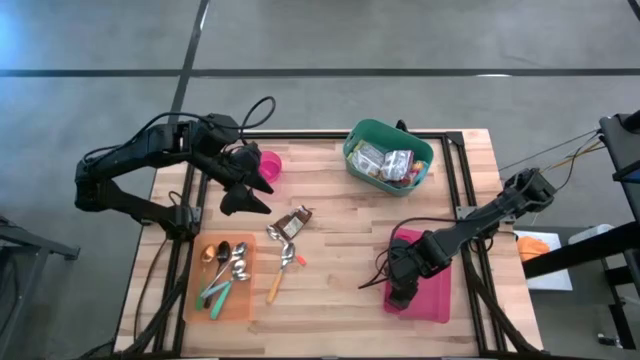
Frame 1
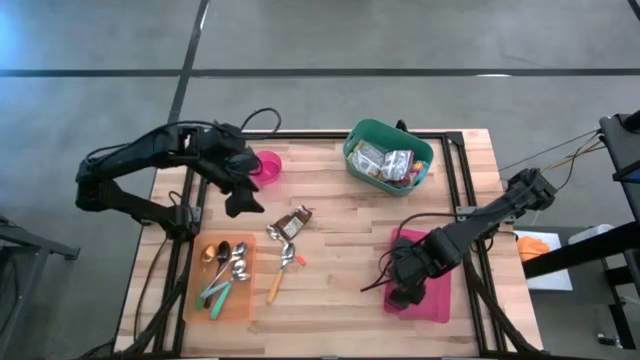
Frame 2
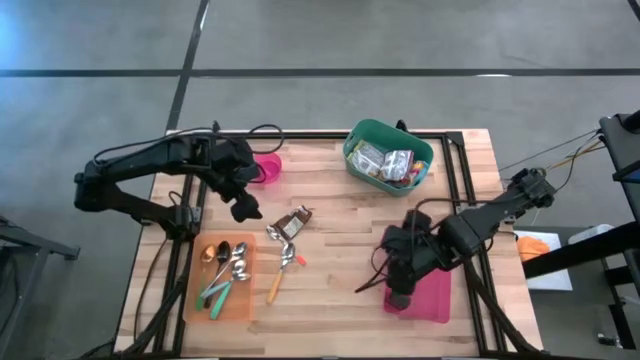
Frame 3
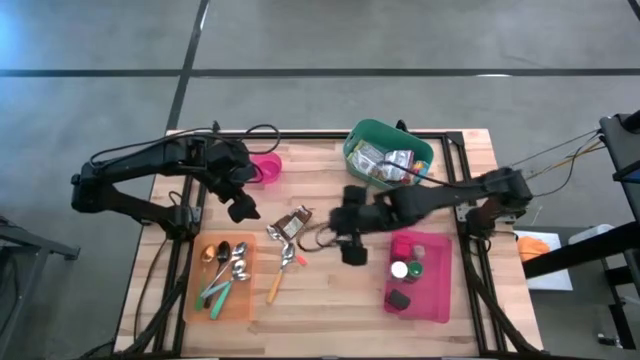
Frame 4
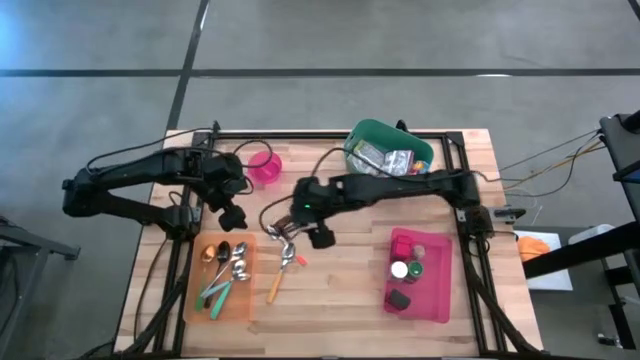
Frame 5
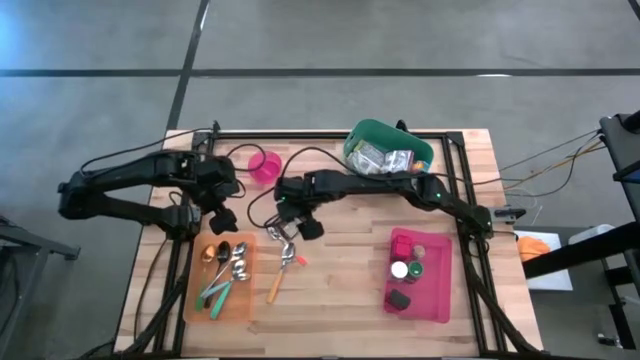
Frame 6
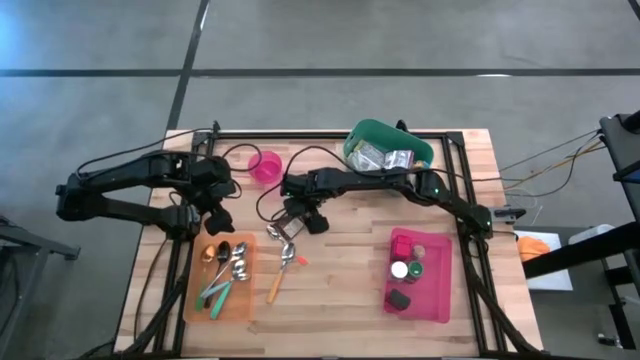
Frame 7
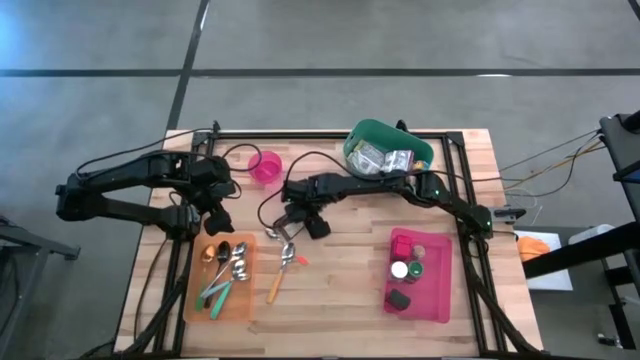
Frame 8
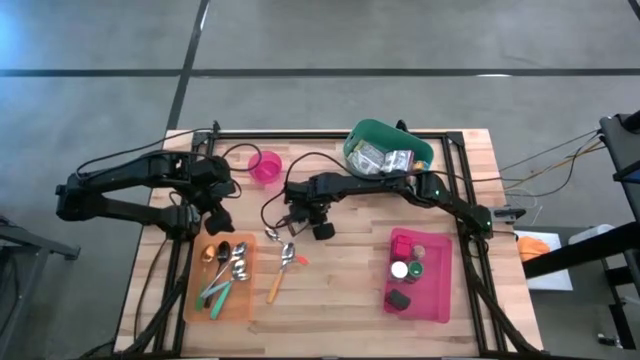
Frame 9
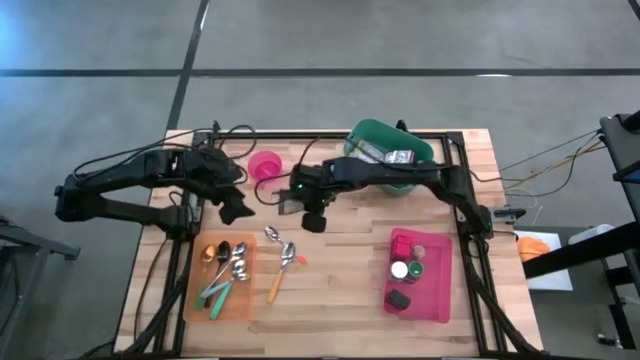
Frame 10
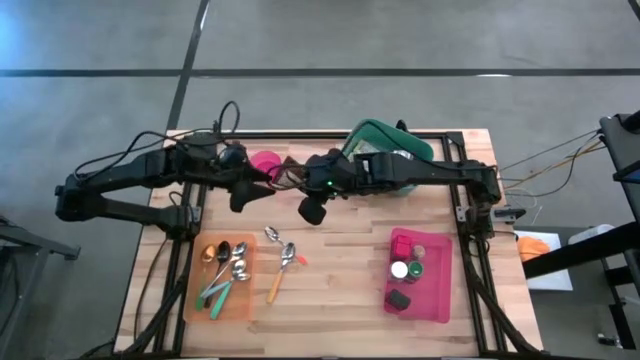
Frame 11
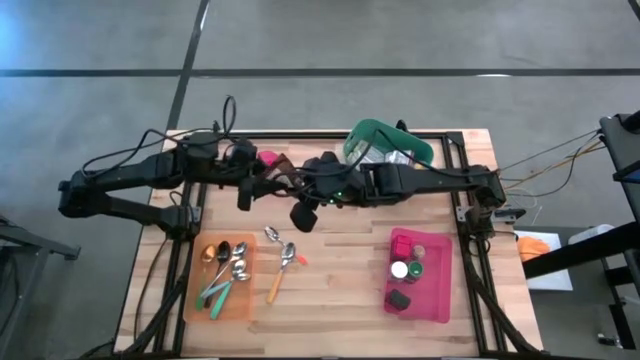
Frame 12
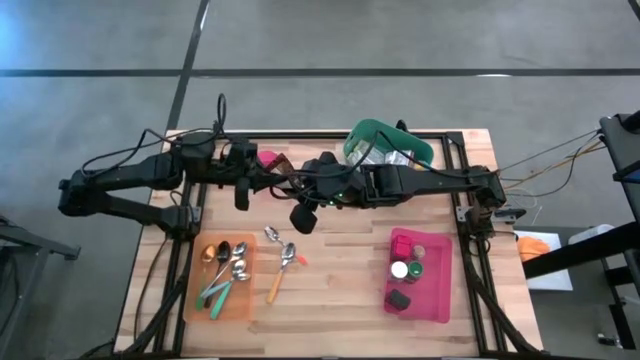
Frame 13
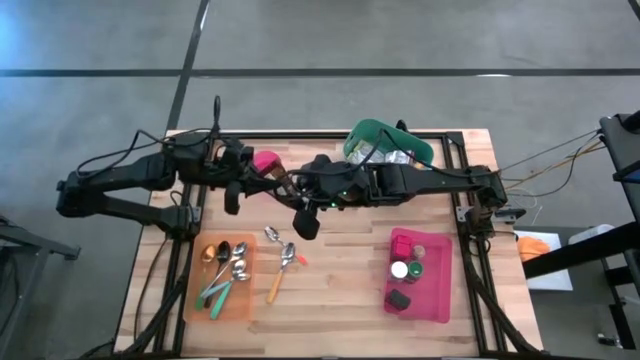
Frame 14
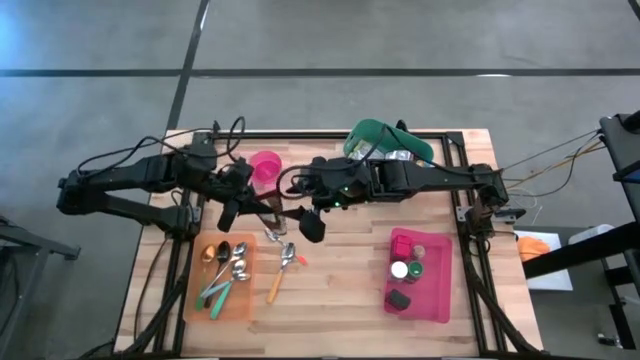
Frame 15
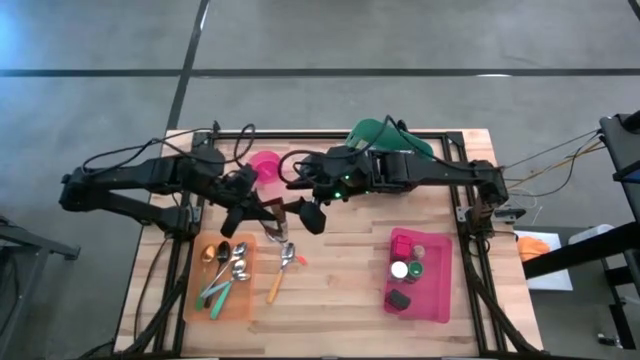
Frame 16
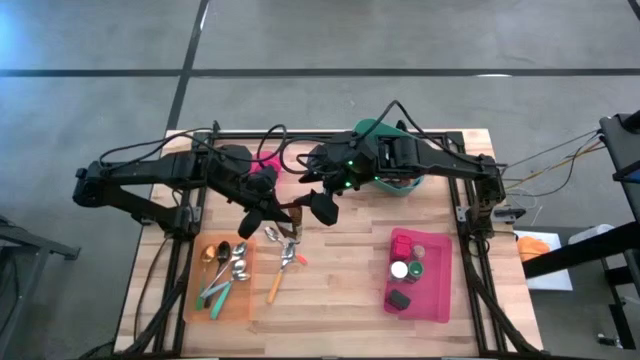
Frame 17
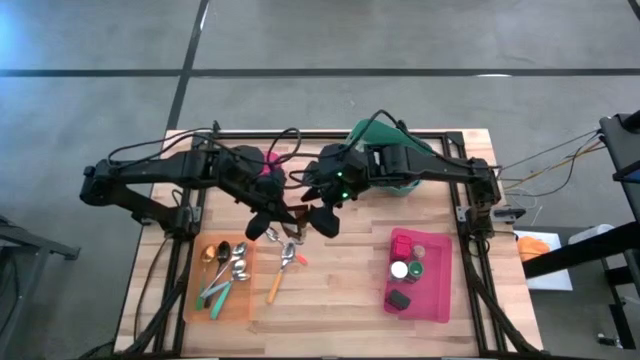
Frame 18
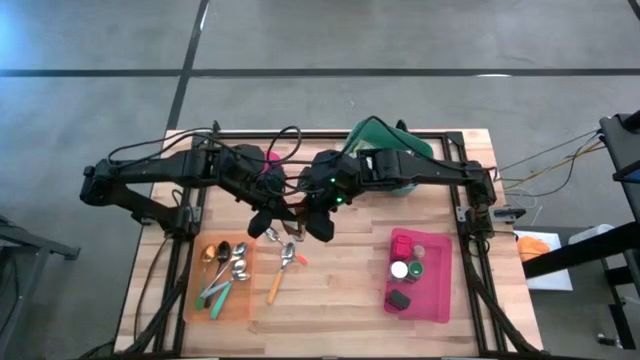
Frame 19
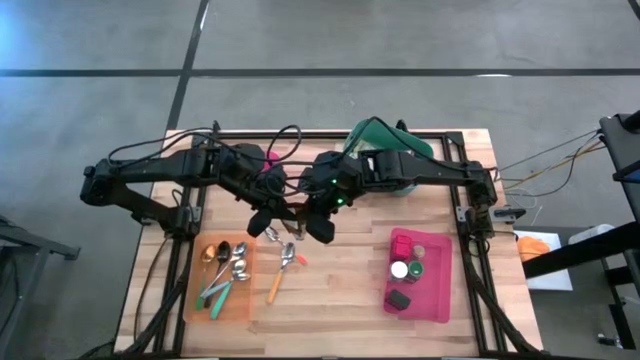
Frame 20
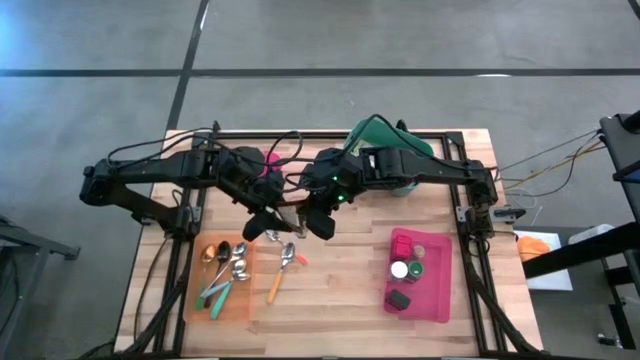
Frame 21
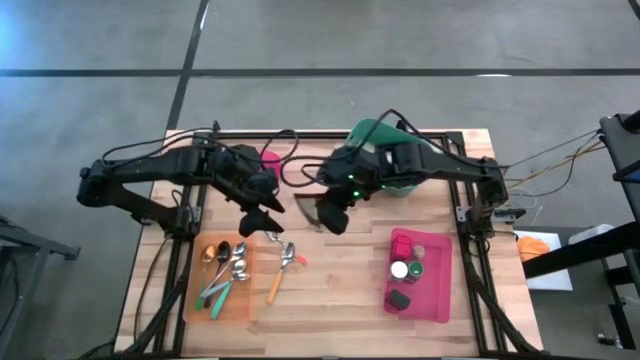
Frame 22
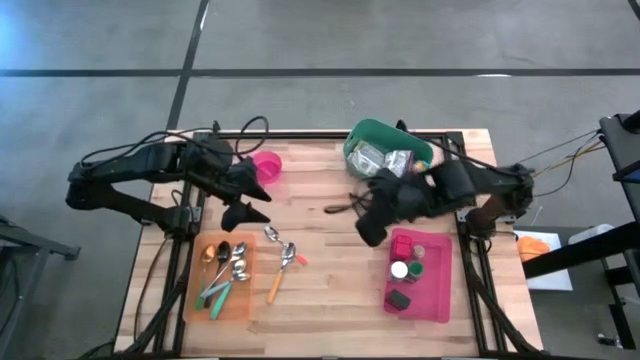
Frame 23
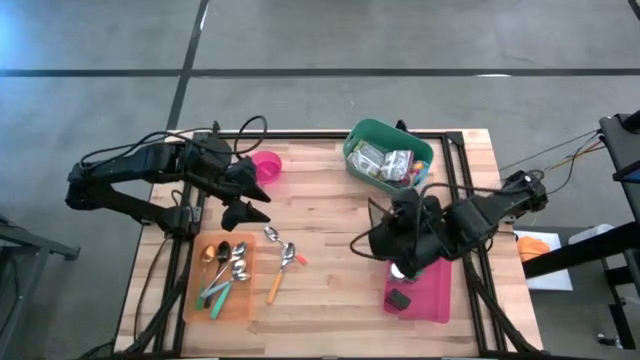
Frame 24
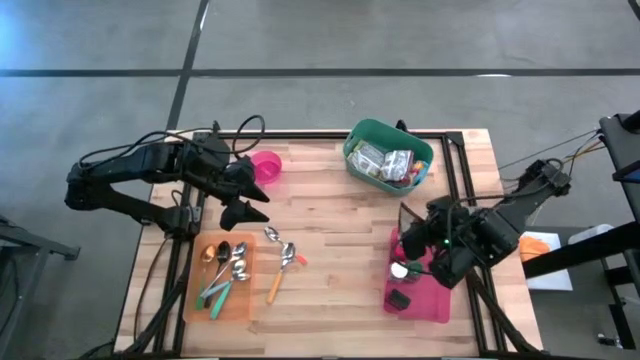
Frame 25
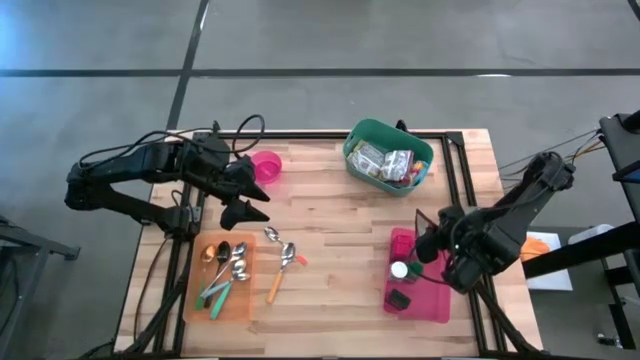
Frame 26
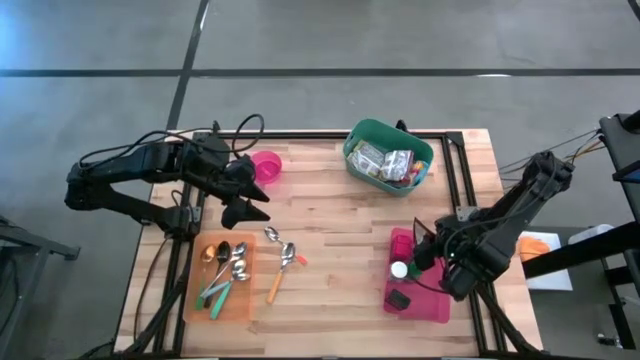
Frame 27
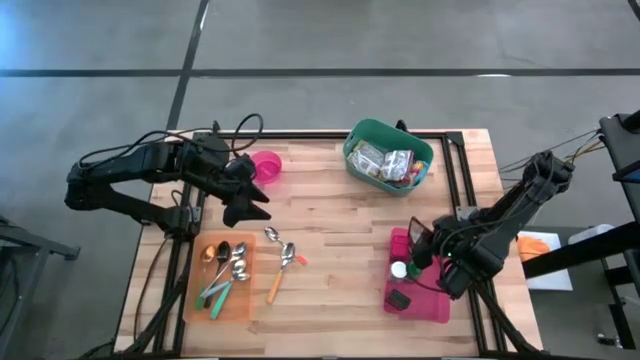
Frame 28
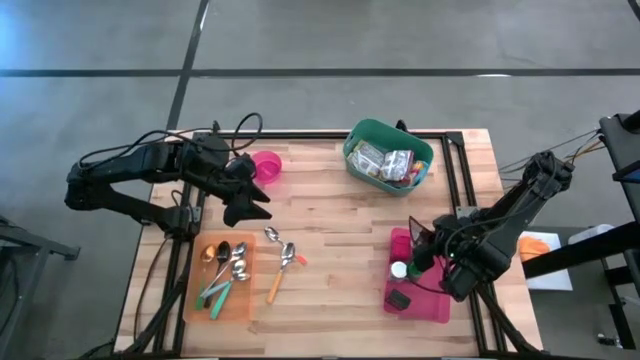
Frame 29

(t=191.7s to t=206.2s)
Task: Pick & Place Food Item
Put the orange seasoning bag into the pink bin
